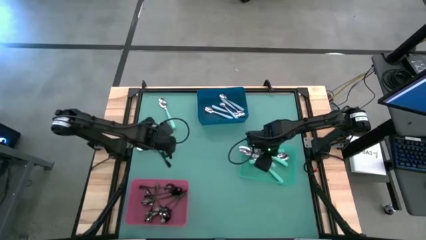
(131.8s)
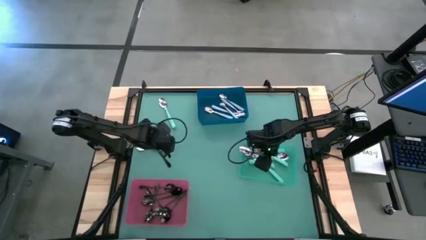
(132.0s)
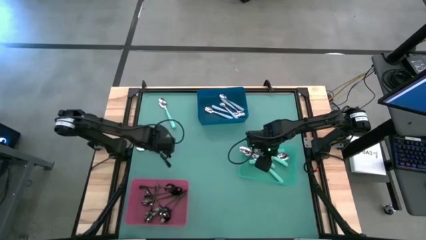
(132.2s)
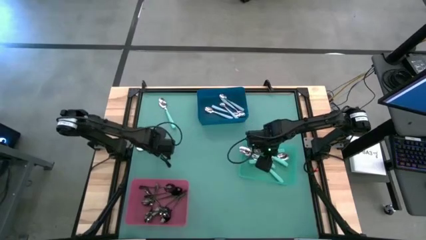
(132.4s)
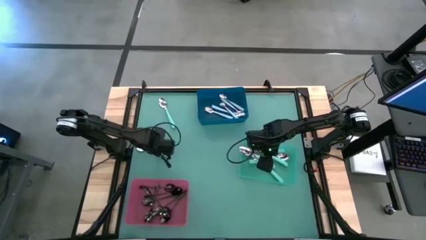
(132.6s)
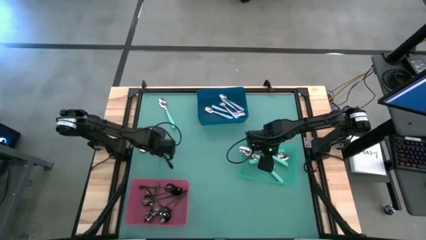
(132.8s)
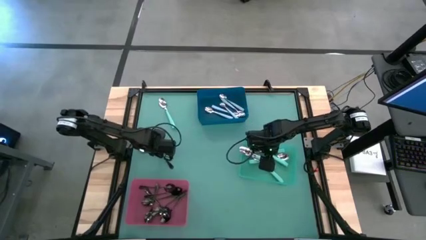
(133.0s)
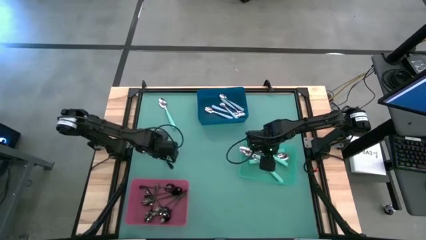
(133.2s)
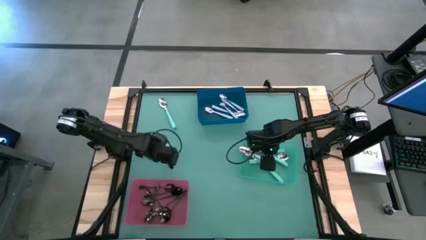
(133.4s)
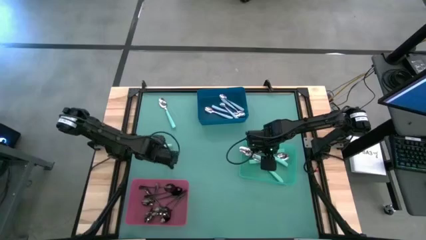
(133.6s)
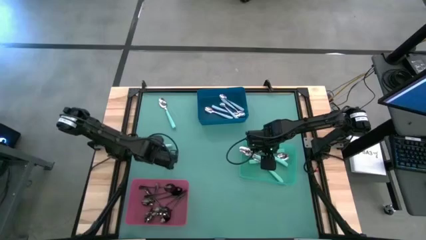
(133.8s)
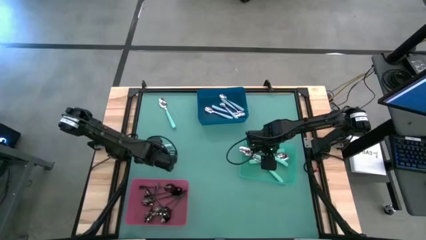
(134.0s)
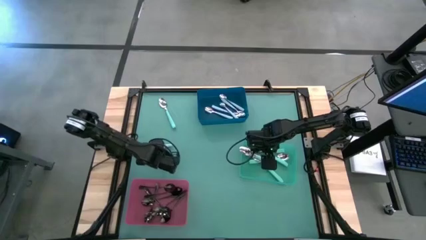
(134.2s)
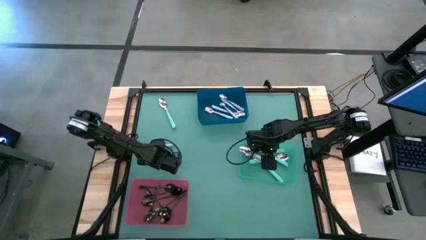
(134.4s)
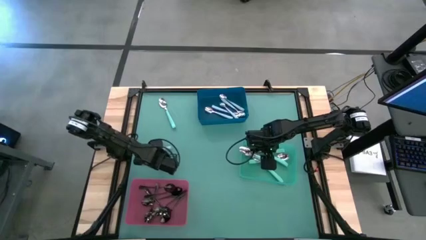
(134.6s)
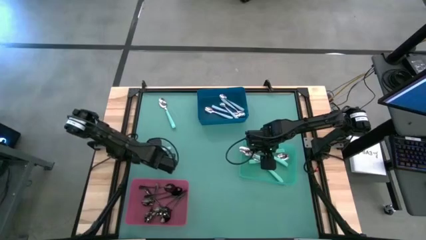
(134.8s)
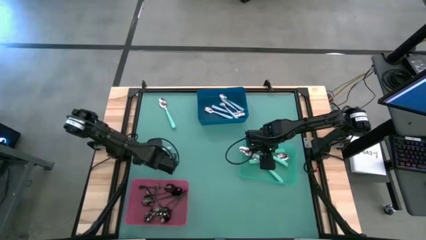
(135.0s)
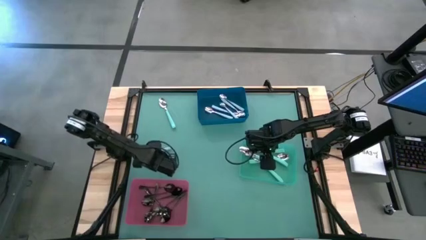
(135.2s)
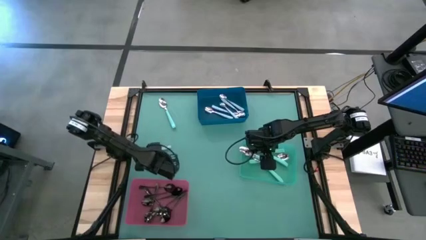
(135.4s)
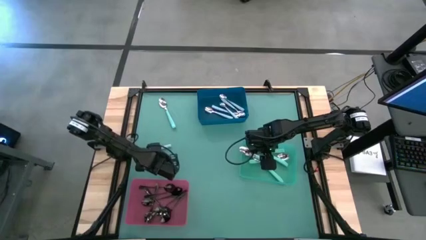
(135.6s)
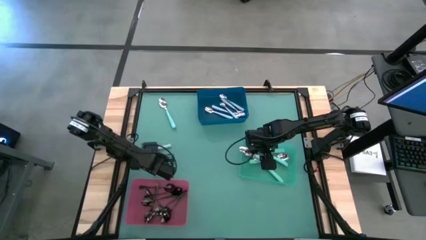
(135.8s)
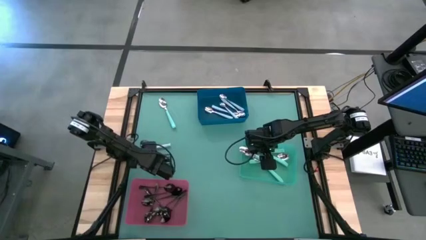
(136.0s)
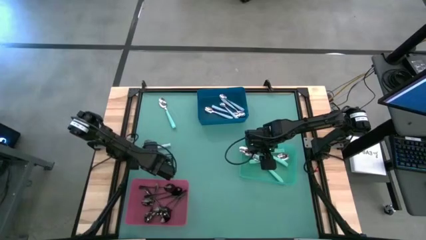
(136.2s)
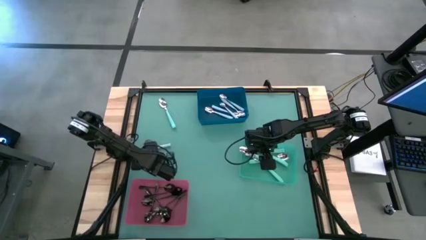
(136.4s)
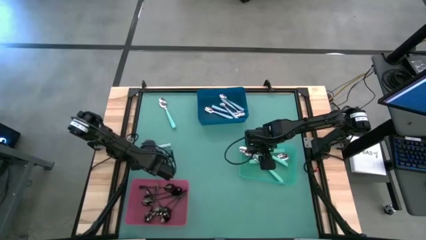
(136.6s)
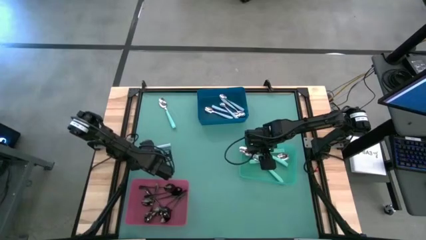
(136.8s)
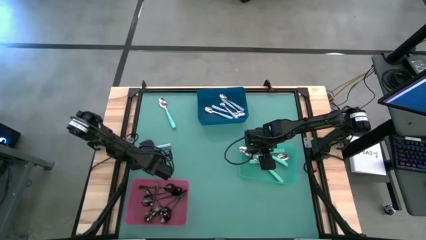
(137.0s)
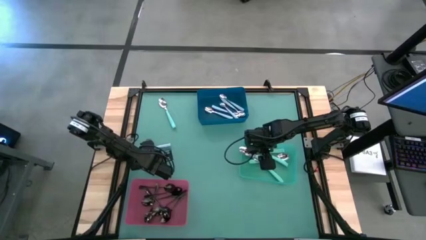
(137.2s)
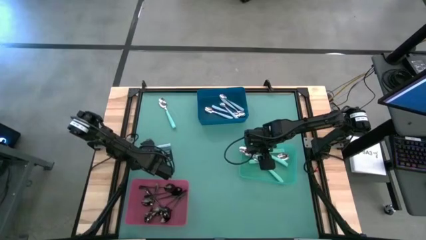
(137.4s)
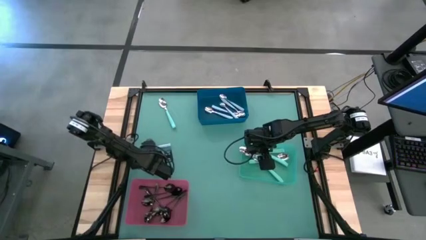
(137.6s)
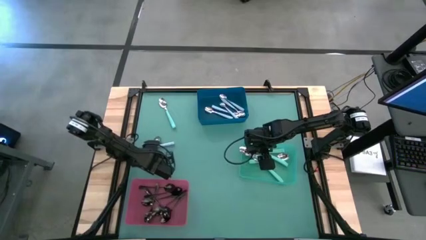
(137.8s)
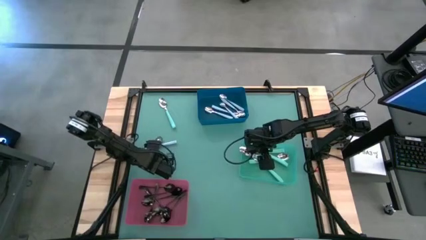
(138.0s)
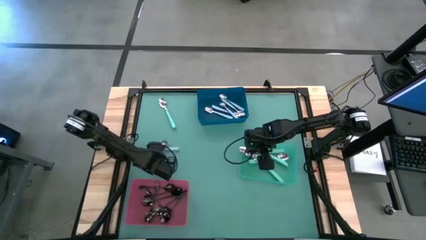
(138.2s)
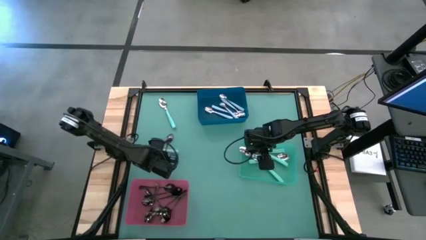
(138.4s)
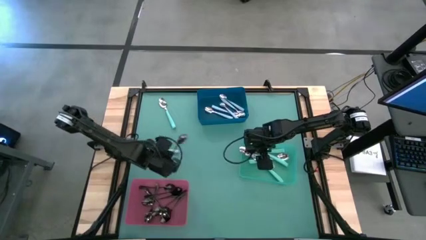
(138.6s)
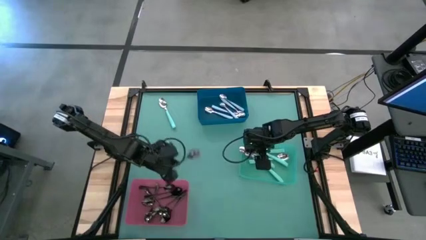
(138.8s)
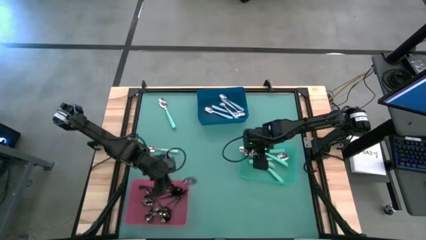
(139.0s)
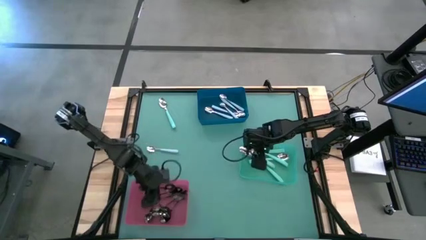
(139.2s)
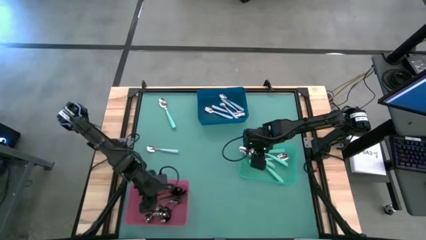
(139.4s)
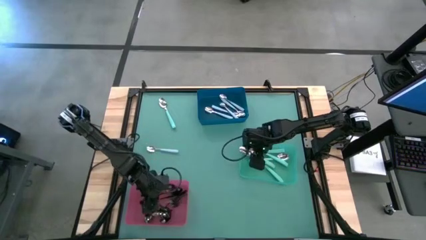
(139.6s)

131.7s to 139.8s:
Task: Sort silverware by color (type)
Put the black spoon into the red bin

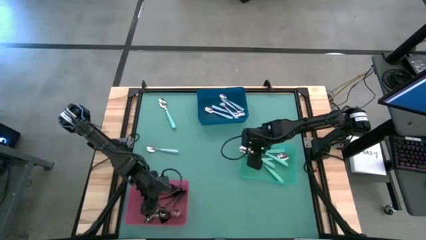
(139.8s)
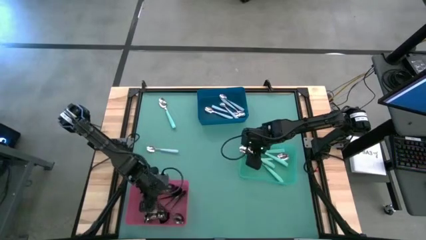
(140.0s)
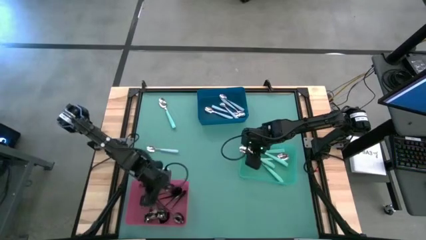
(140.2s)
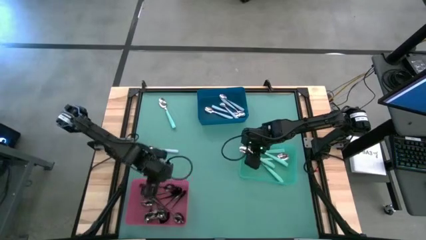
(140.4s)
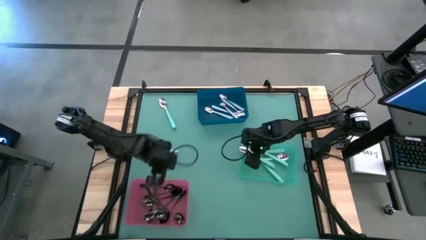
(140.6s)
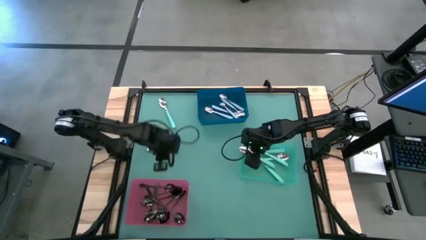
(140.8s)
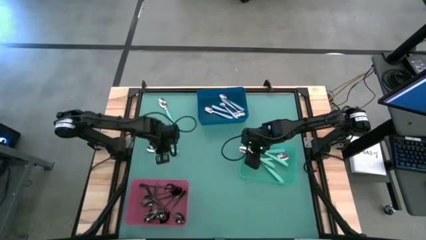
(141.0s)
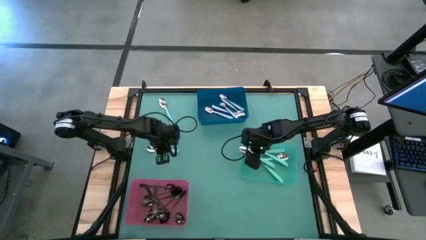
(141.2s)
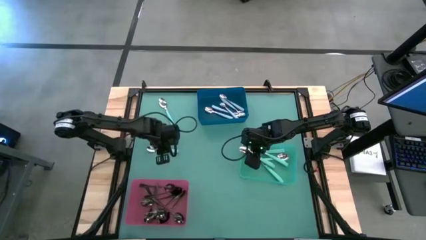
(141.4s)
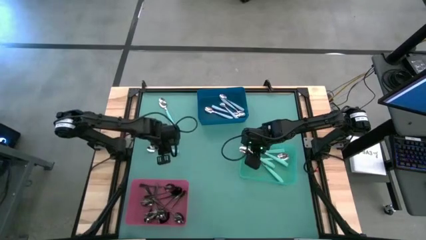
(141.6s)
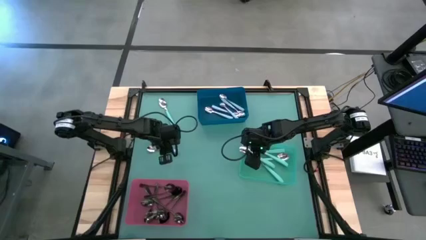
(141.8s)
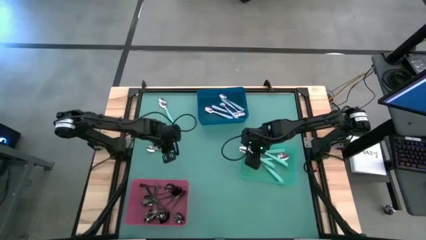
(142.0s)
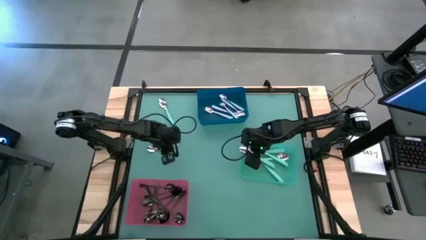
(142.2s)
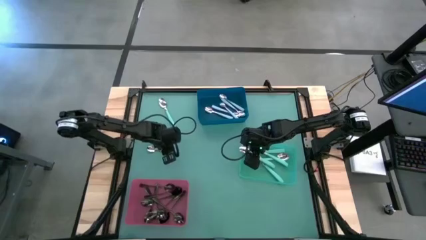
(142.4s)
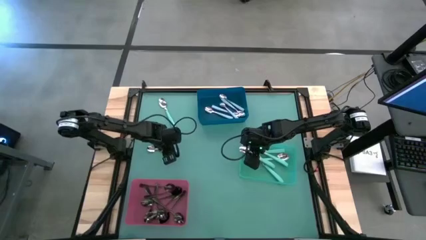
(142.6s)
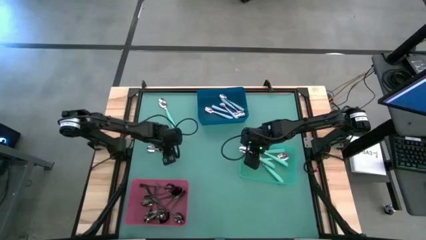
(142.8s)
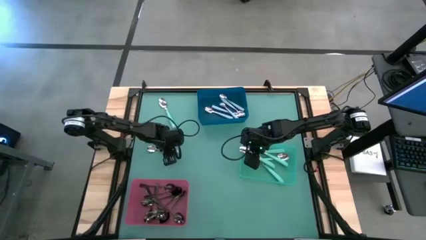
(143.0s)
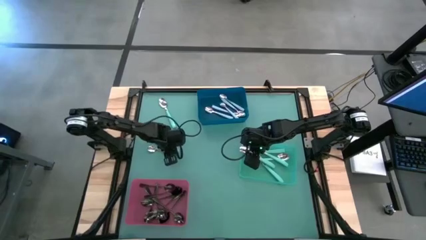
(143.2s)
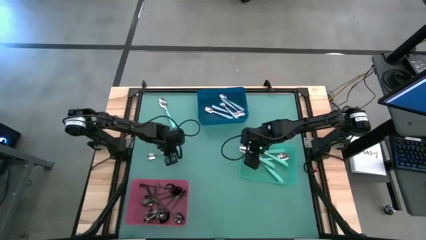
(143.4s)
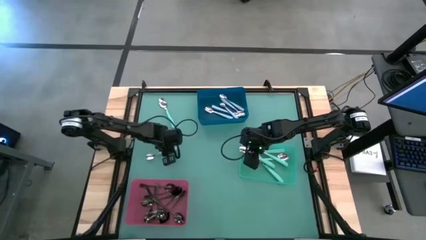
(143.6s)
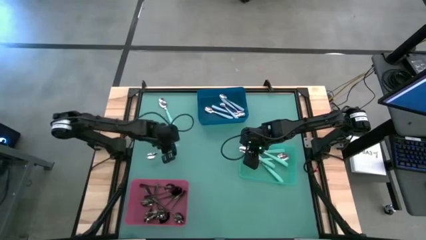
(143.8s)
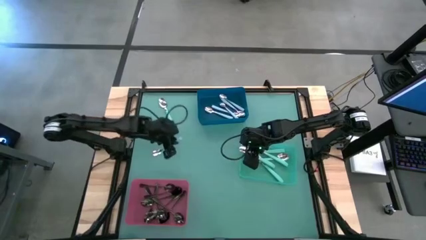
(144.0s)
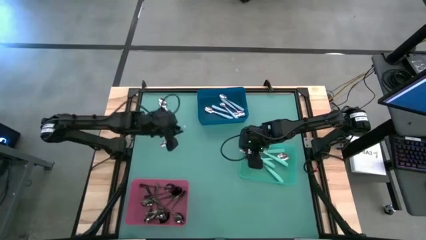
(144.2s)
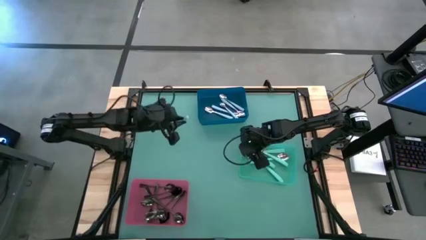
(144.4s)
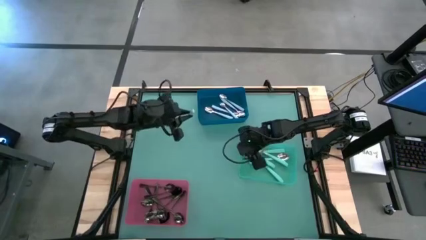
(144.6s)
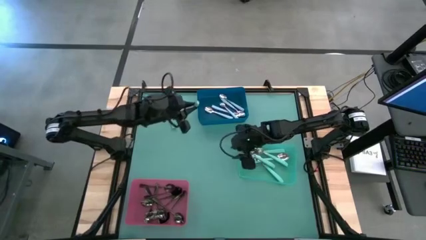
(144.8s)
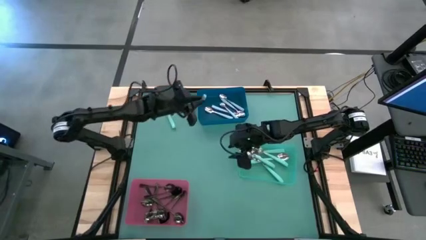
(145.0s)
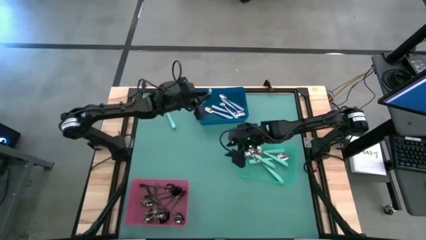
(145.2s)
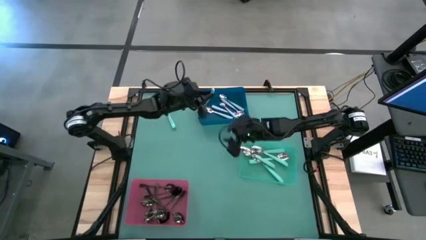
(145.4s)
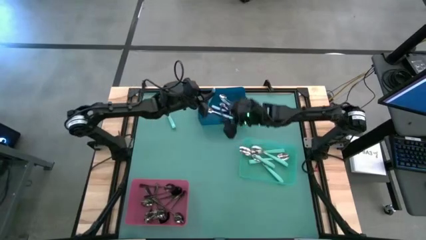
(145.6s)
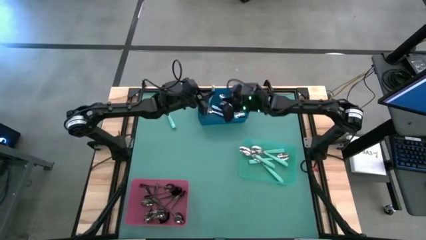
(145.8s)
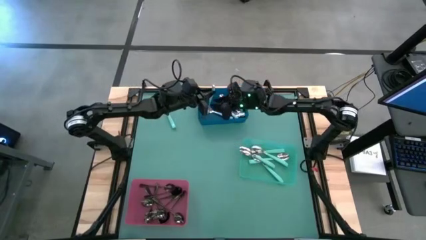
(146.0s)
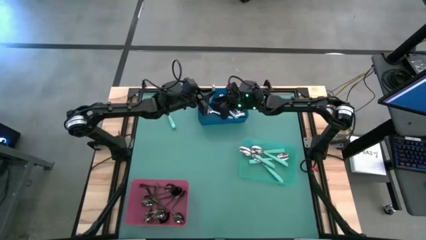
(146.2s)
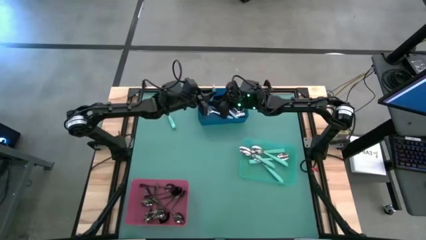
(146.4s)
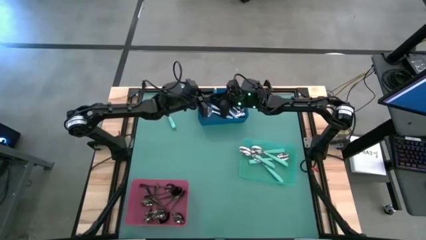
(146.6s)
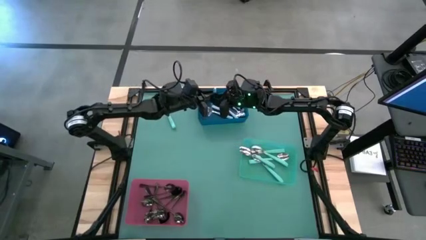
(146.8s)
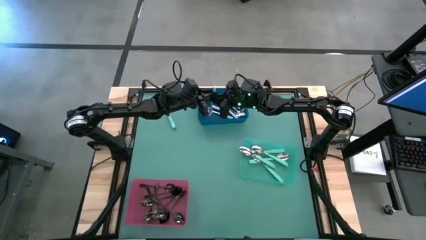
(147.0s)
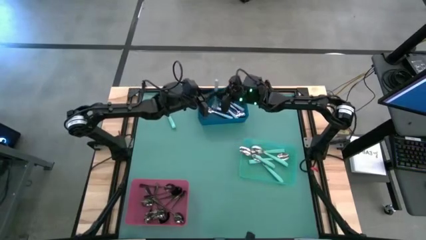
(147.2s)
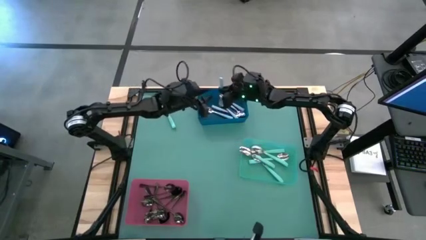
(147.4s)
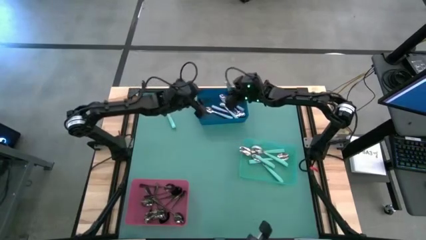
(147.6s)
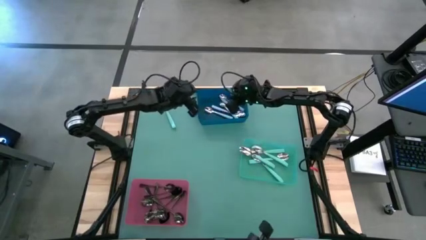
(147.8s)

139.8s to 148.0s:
Put the blue spoon into the blue bin
